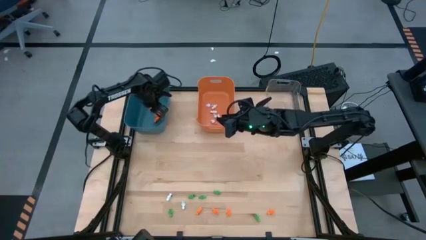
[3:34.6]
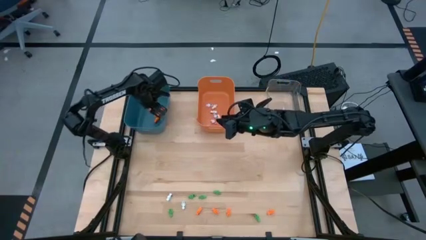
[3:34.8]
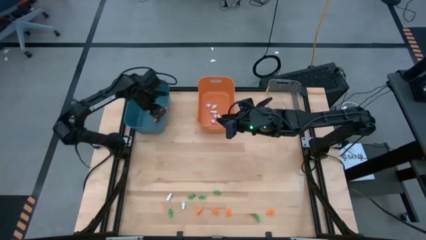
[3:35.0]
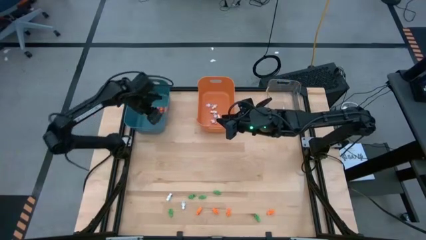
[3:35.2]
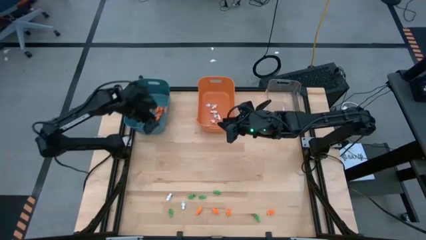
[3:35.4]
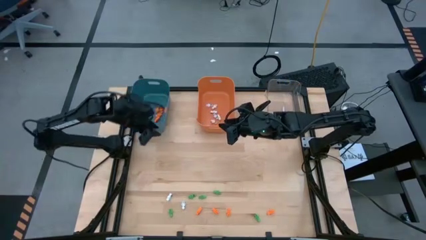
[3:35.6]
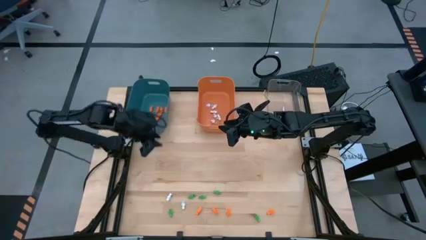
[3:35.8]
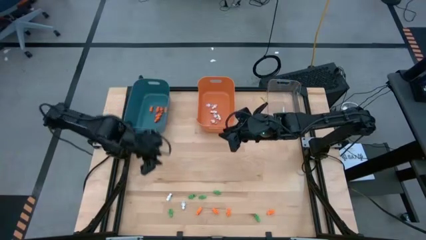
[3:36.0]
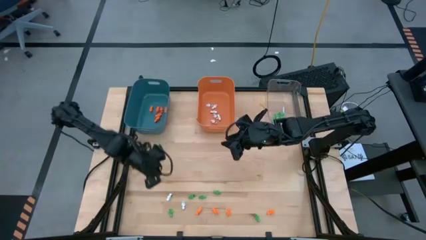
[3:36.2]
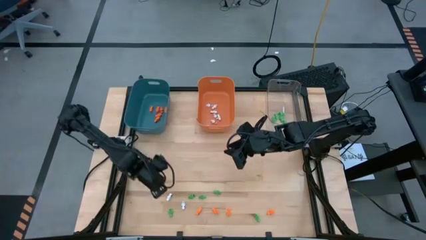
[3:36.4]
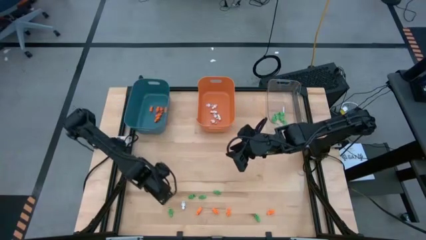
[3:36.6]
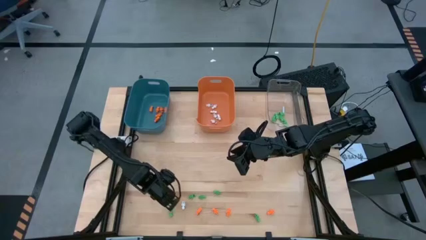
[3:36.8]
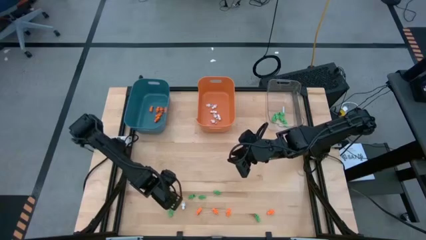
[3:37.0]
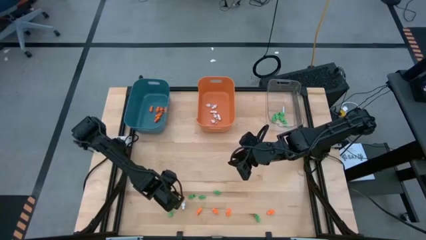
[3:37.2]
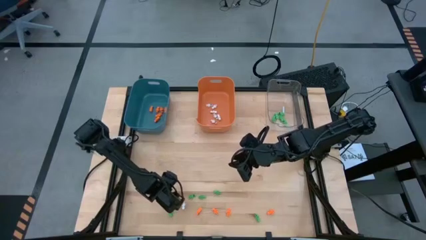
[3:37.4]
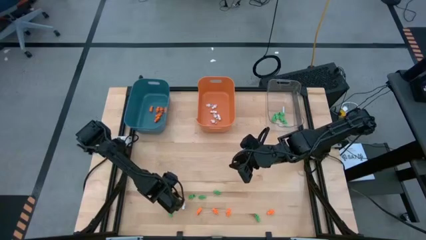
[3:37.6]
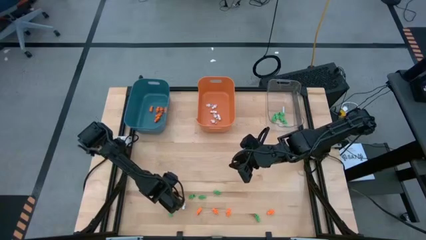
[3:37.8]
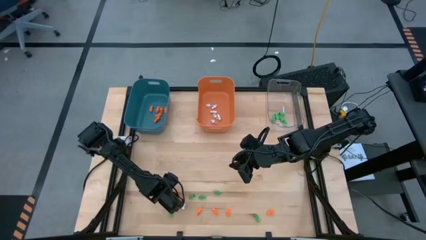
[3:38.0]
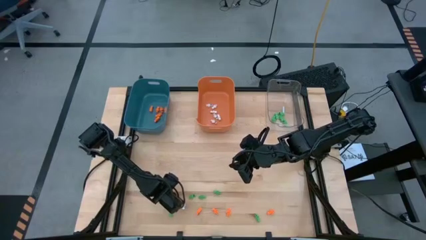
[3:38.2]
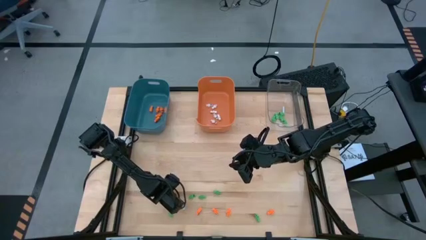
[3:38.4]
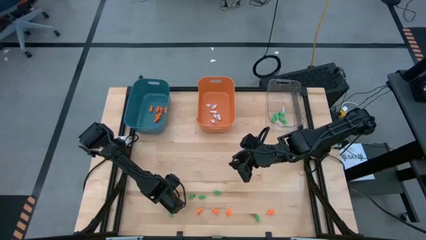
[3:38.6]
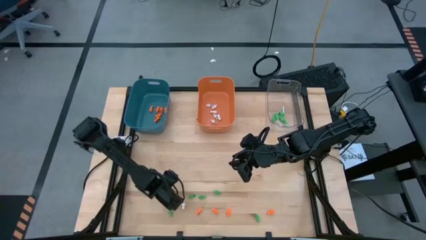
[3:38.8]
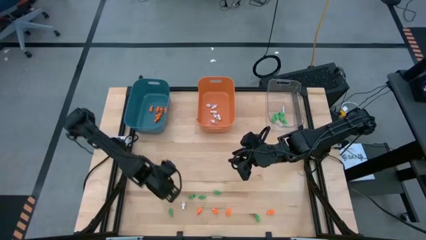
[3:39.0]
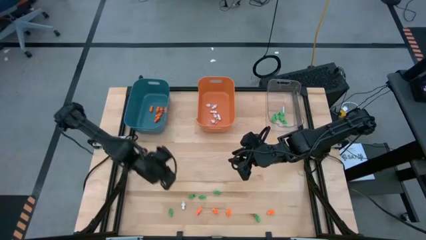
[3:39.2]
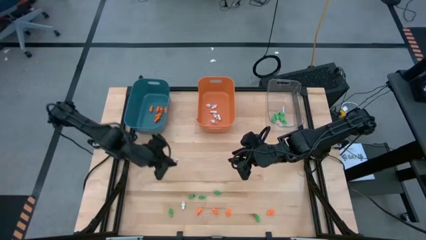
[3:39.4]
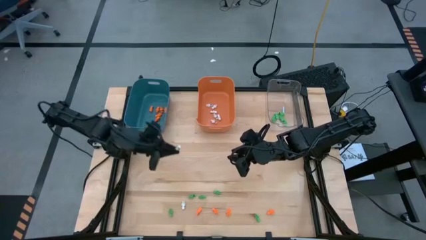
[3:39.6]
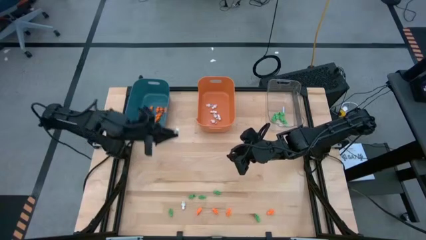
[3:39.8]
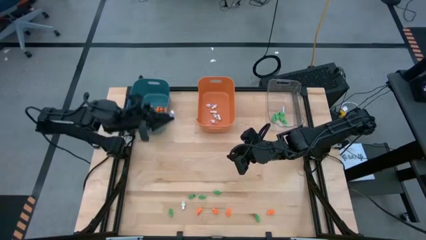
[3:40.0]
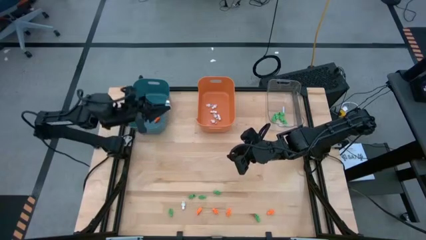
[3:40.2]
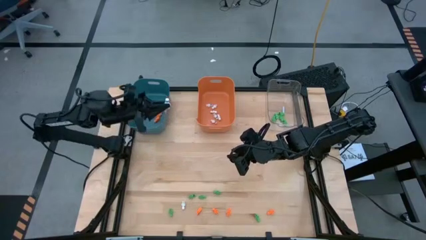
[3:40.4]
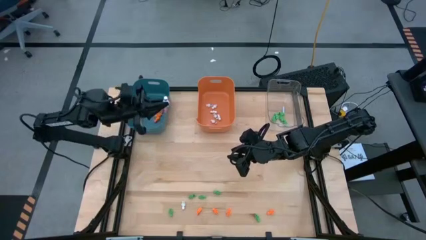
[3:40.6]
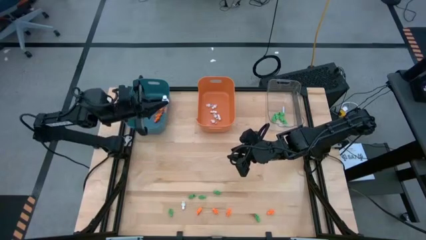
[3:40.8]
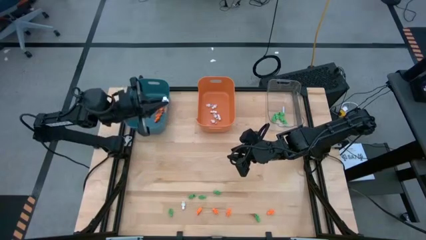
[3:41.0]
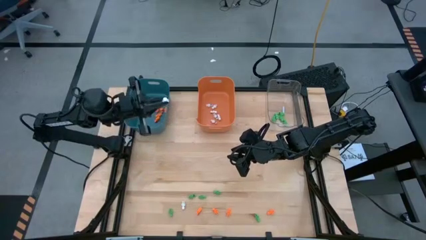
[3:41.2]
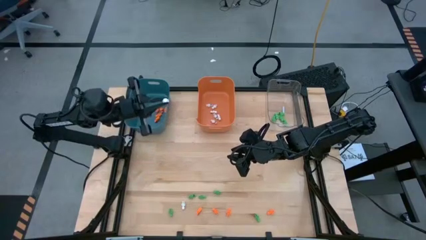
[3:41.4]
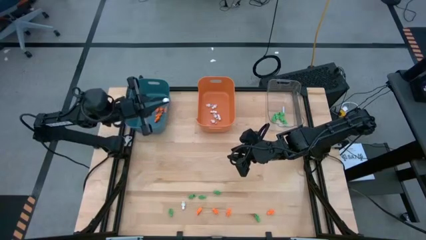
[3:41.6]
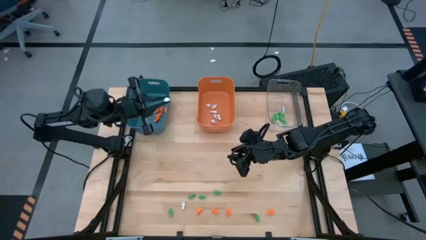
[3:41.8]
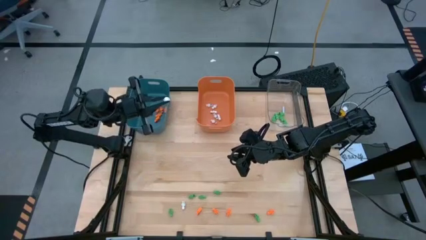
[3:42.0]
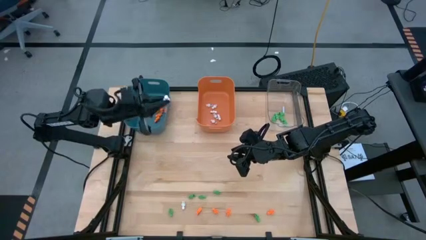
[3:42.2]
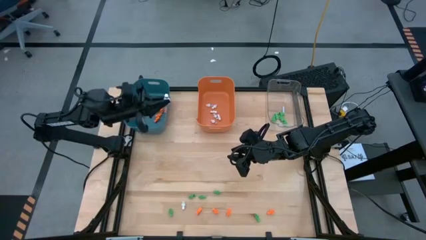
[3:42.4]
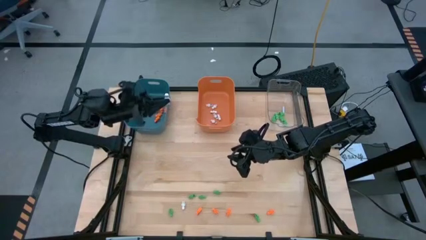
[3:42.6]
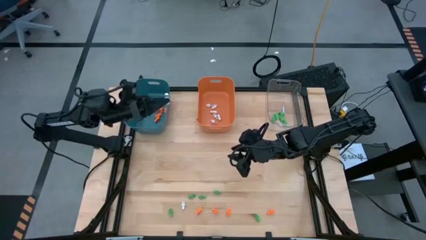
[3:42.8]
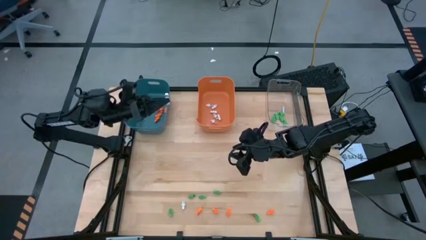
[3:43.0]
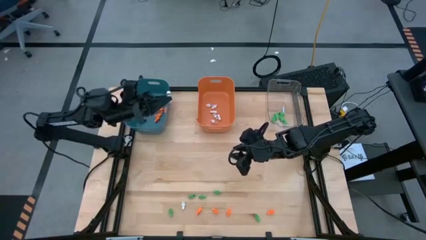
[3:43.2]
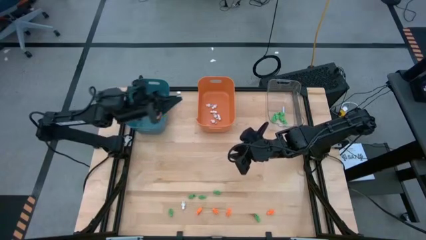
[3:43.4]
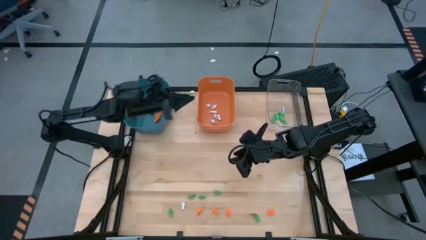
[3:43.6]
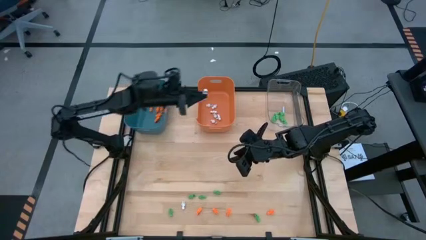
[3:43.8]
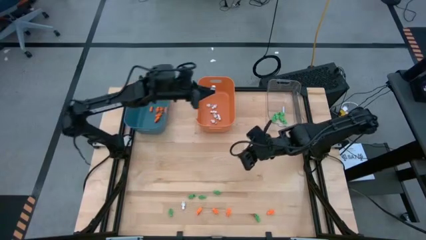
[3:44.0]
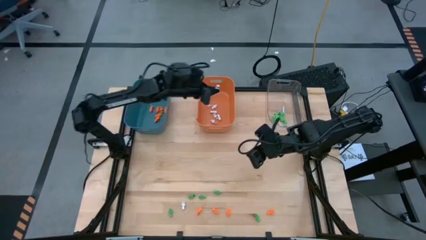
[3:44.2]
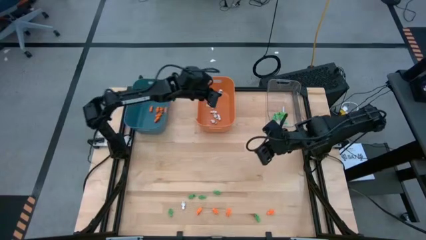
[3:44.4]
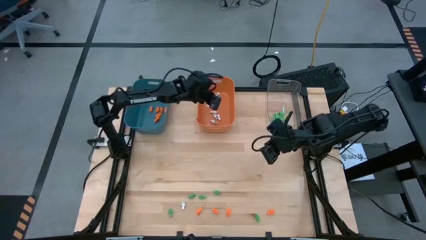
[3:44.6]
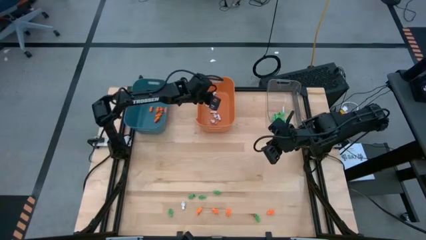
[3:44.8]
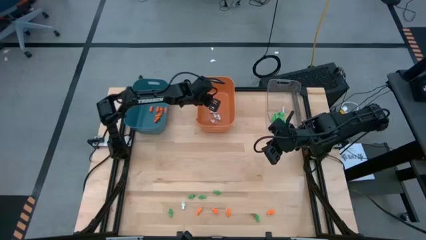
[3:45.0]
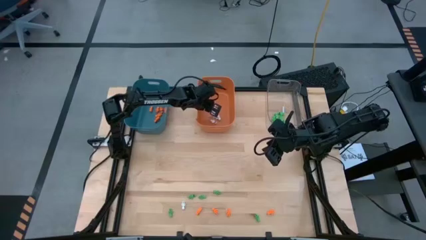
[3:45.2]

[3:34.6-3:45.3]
Task: Sort Halloween decoration
Put the white skeleton toy into the orange bin
